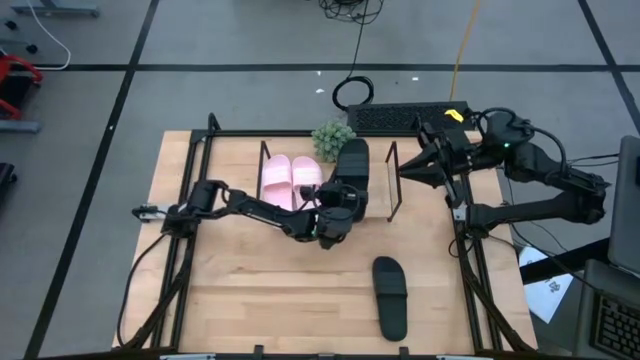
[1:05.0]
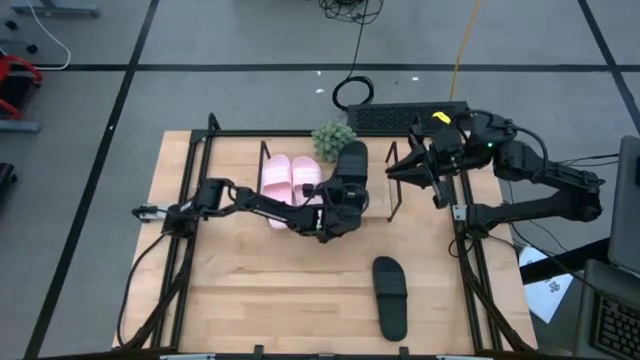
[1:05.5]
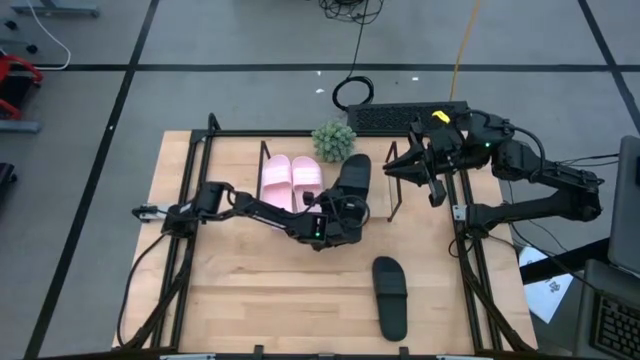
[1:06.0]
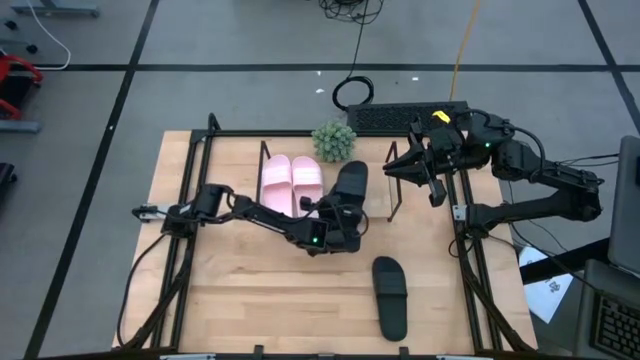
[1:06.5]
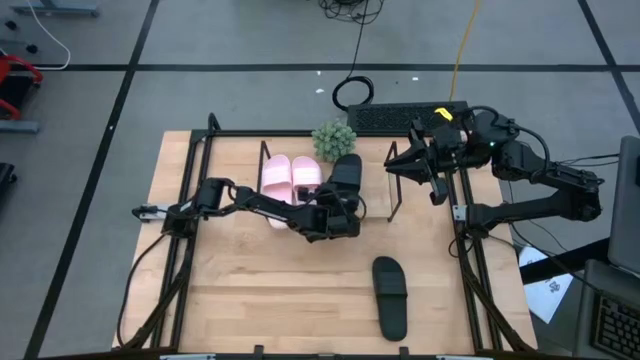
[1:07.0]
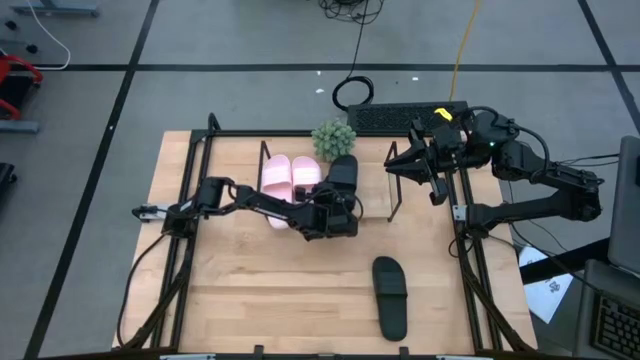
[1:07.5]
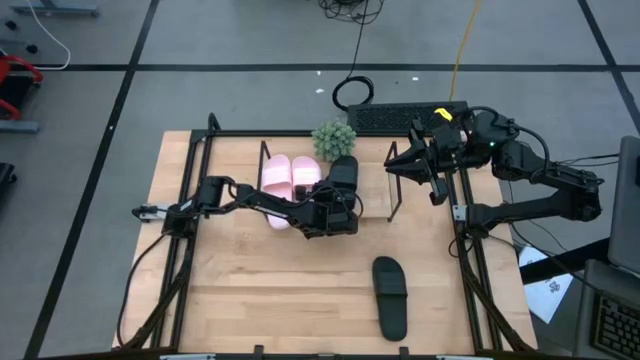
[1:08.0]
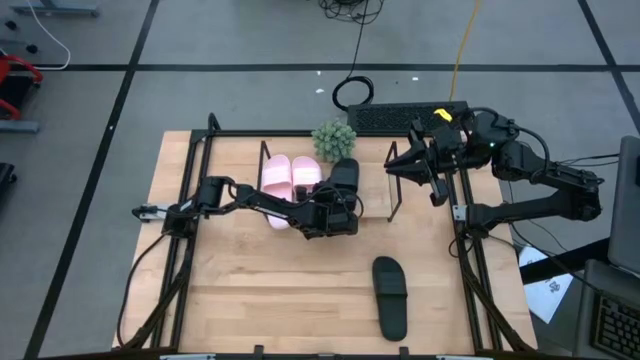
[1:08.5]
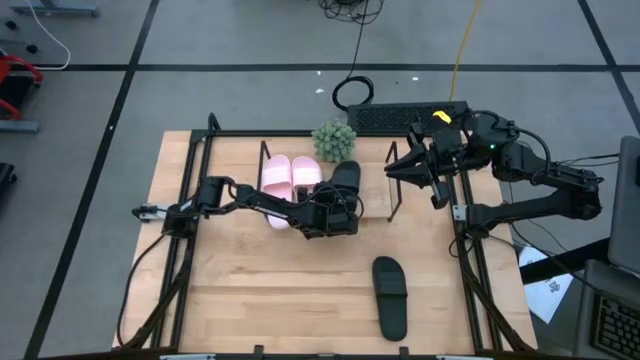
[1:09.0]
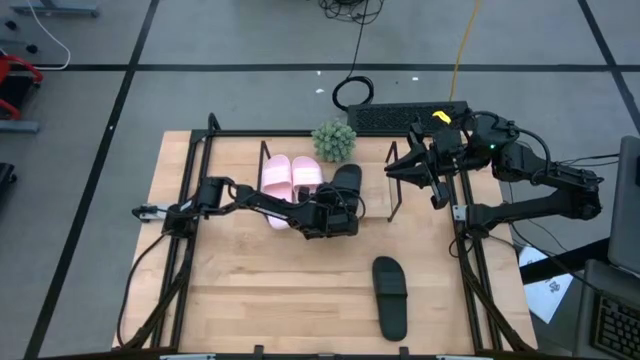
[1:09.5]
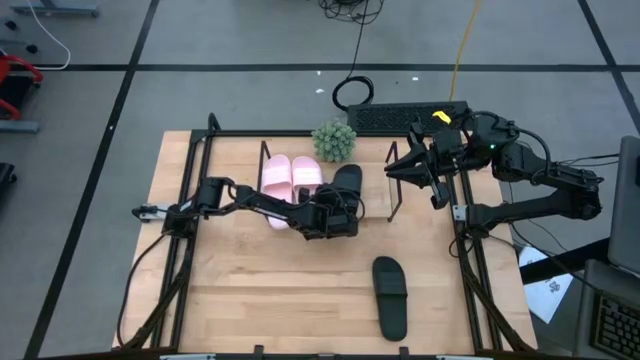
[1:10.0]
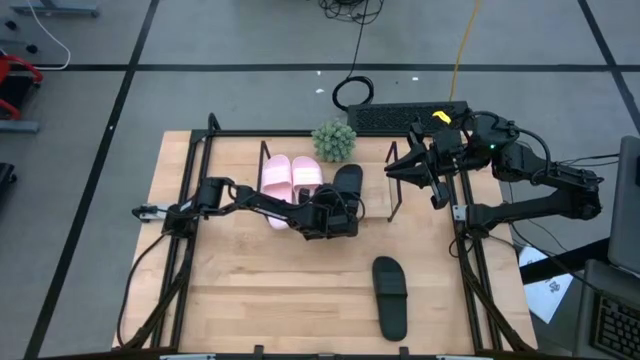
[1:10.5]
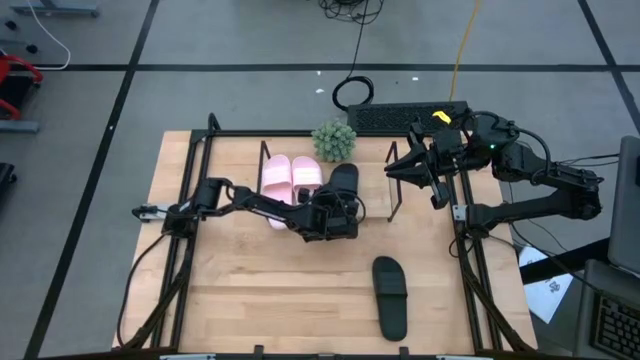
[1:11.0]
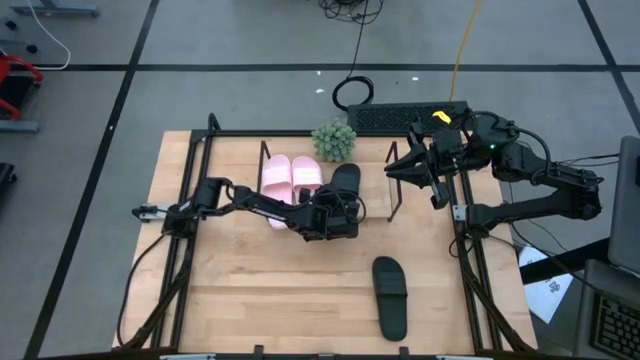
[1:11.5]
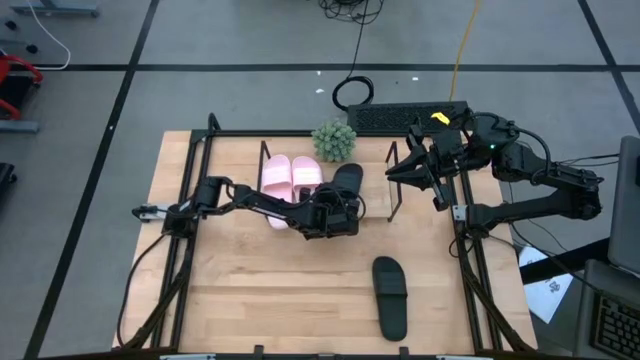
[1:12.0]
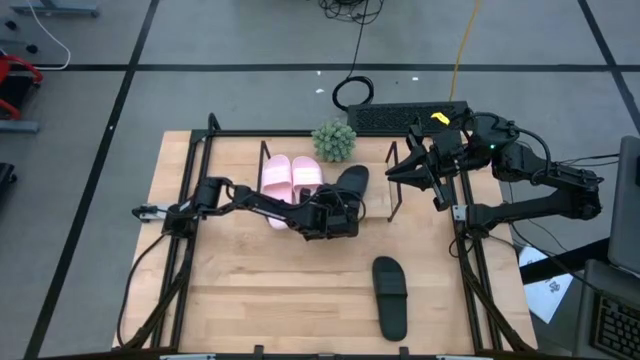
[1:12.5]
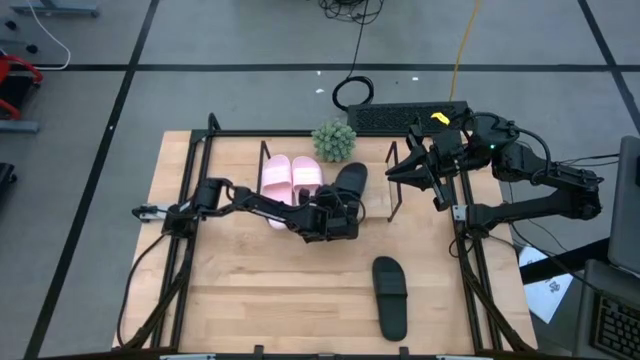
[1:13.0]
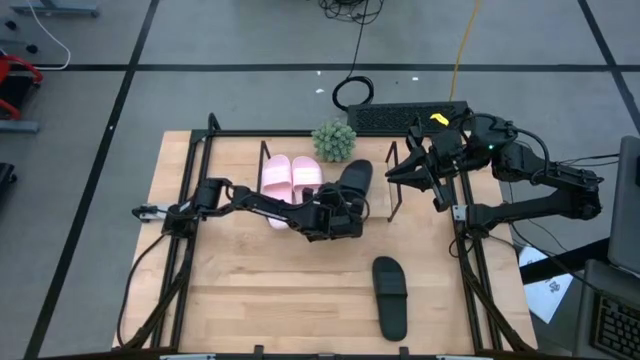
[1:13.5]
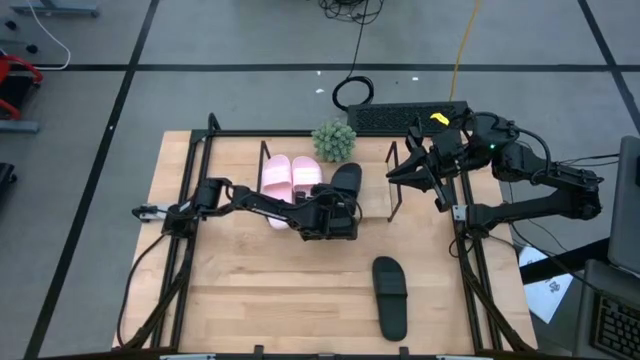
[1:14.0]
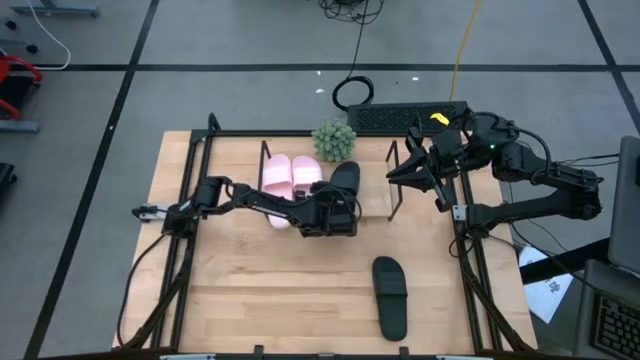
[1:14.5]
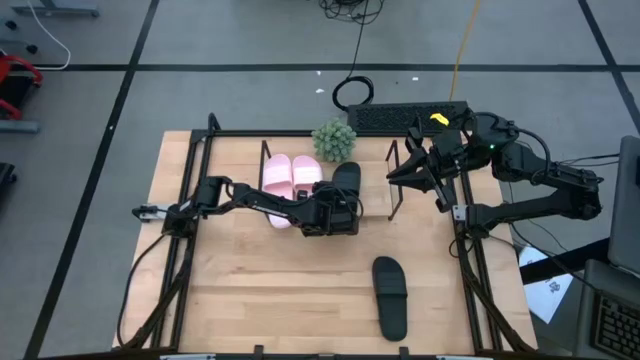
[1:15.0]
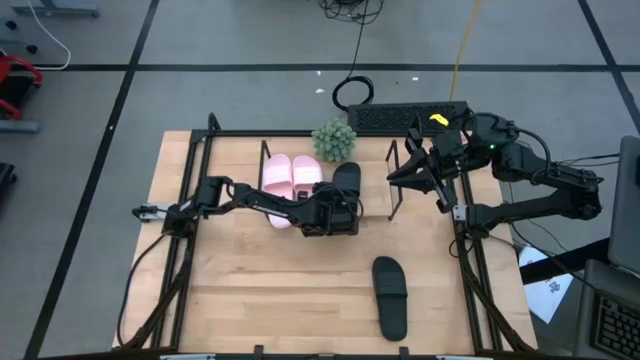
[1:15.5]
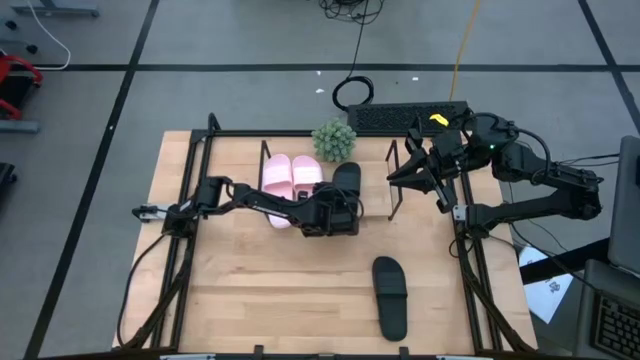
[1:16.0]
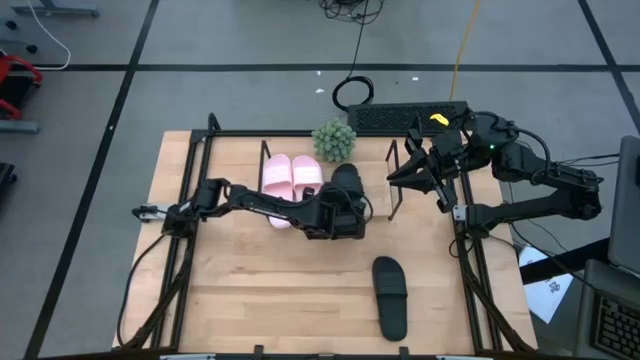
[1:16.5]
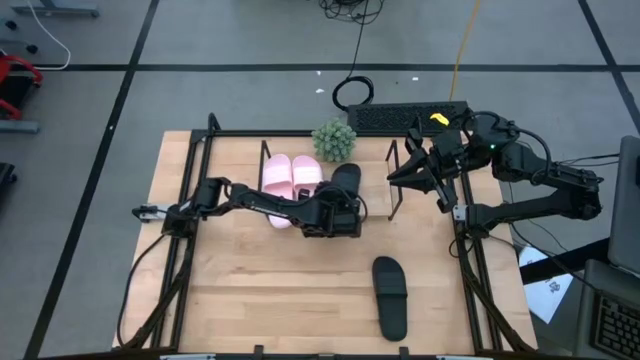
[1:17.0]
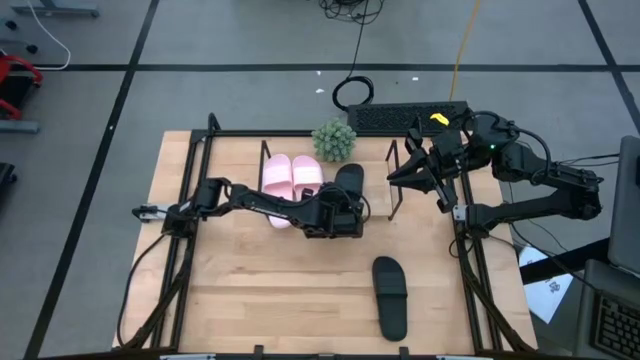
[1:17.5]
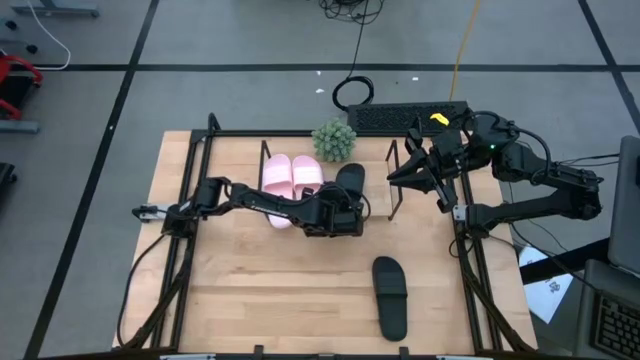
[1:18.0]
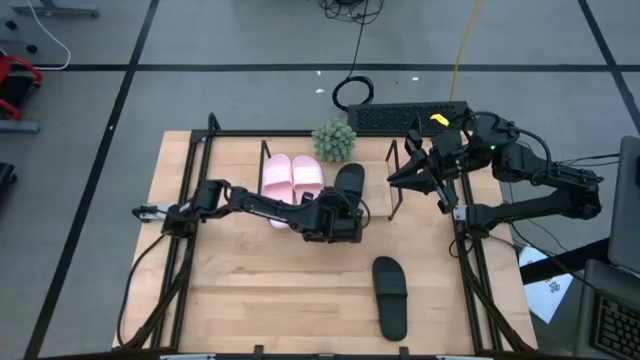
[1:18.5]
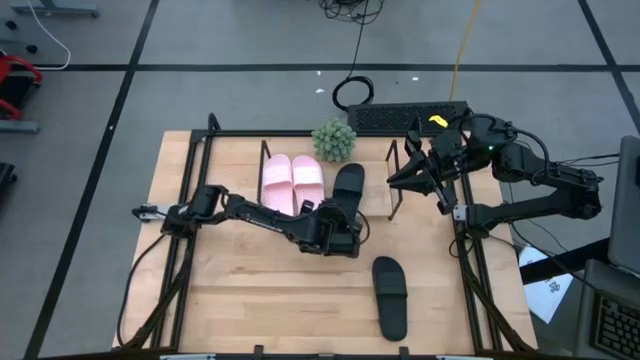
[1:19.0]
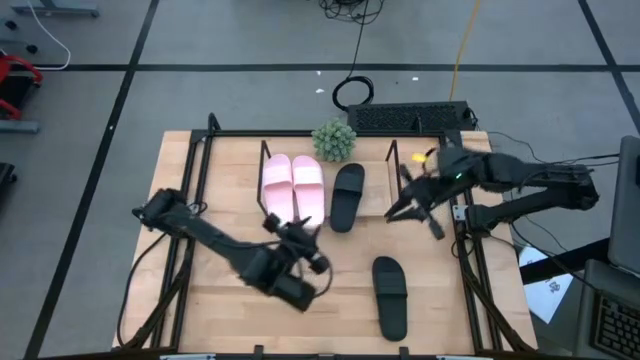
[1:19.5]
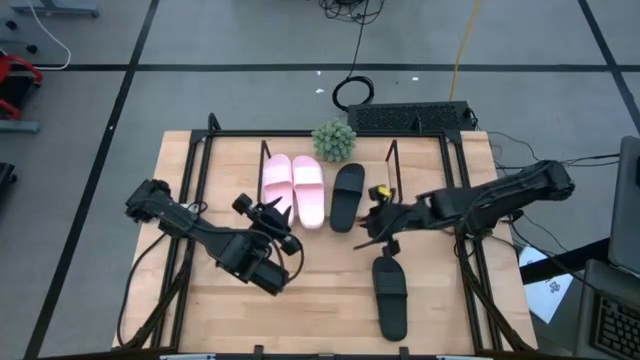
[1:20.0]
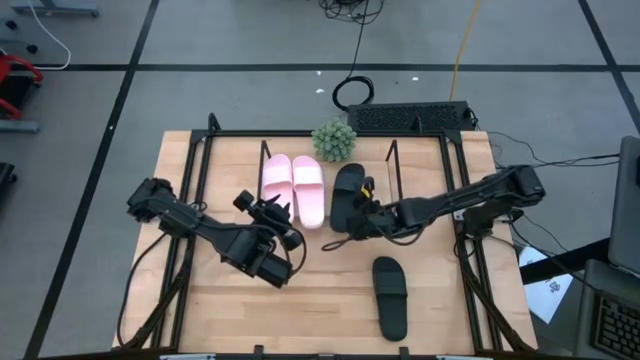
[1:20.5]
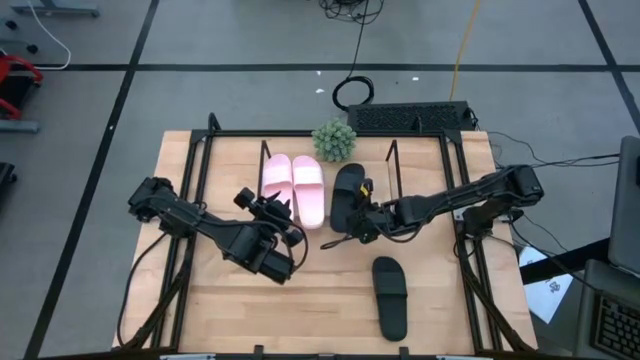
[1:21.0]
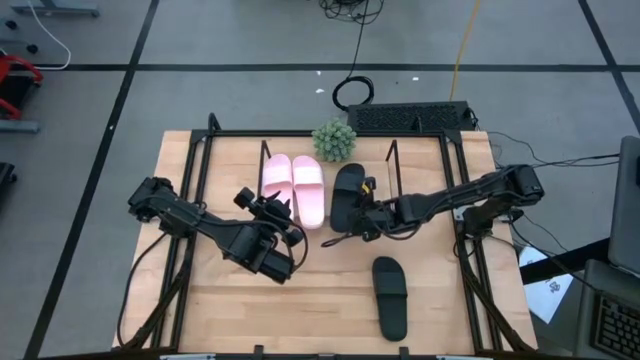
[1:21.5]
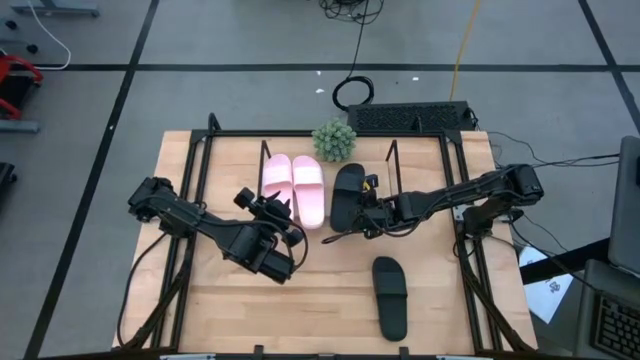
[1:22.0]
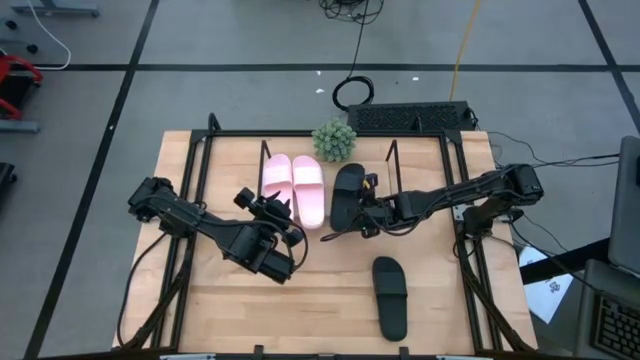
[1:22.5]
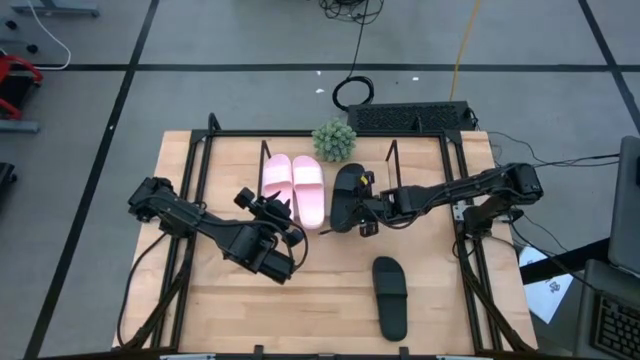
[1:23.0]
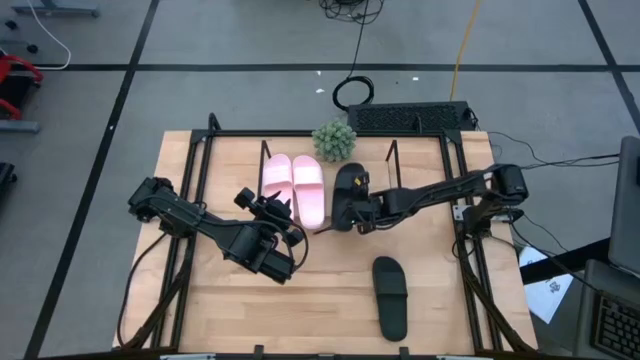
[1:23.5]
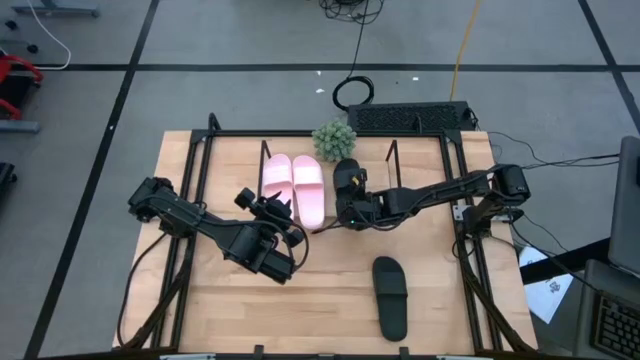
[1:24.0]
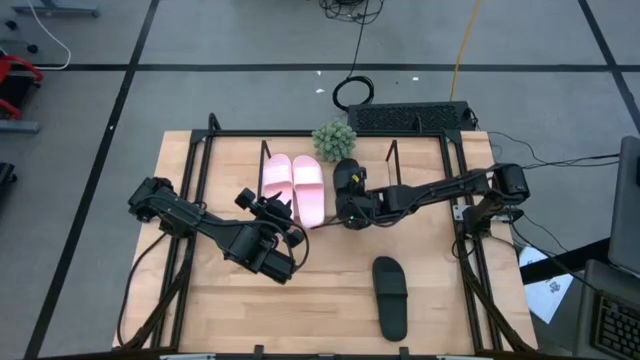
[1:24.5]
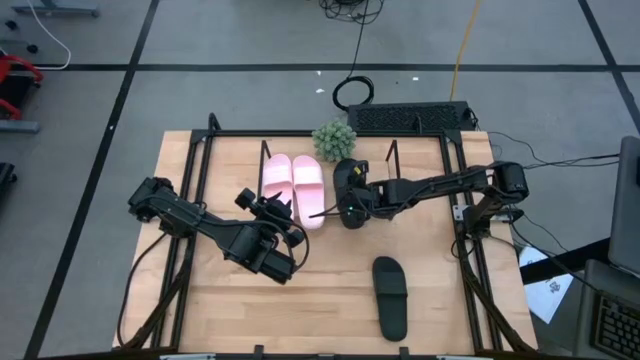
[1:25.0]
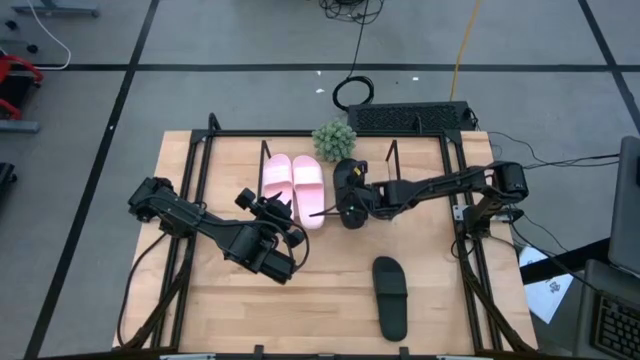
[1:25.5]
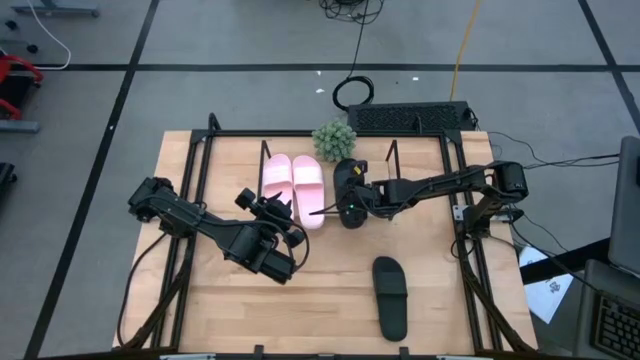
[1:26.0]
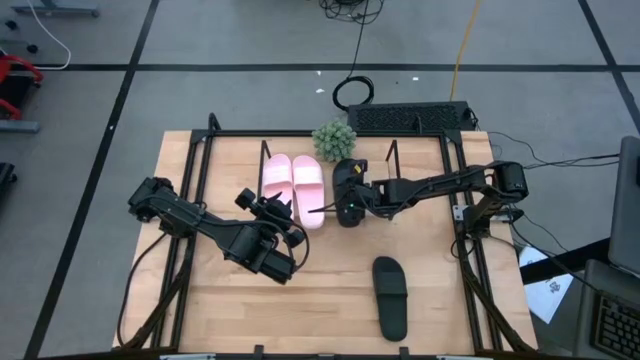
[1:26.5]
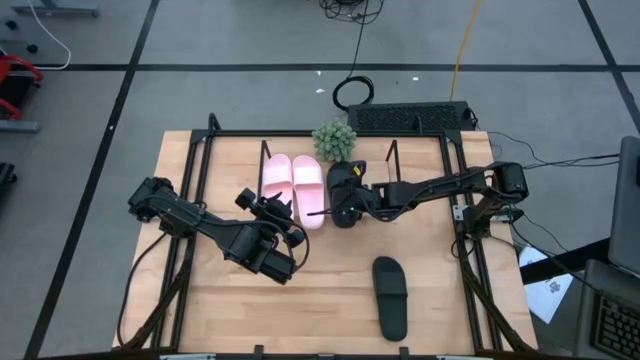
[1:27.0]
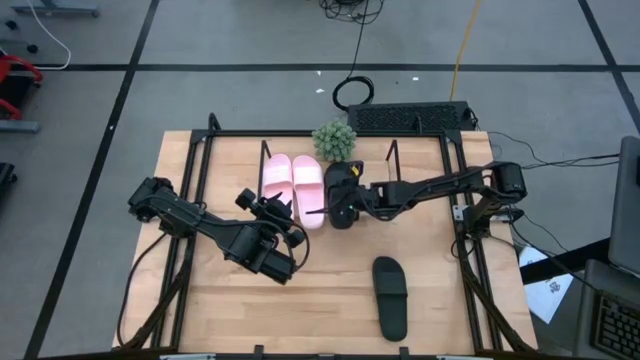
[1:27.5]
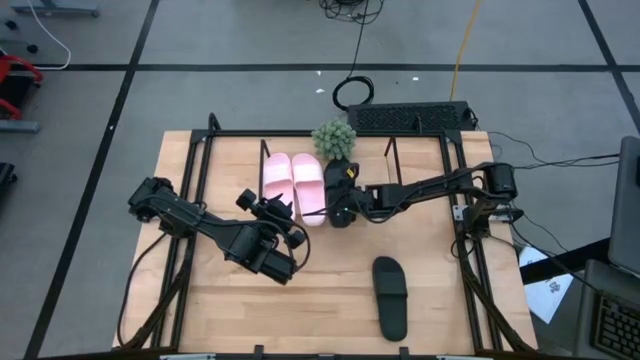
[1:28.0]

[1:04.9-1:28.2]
Task: Pick and place slides into the shelf
Put the left black slipper on the shelf
